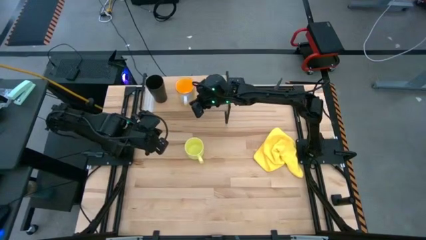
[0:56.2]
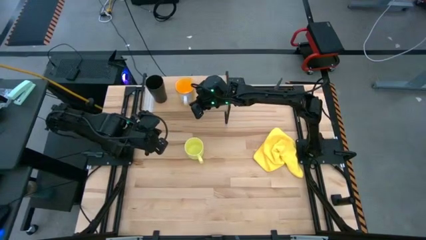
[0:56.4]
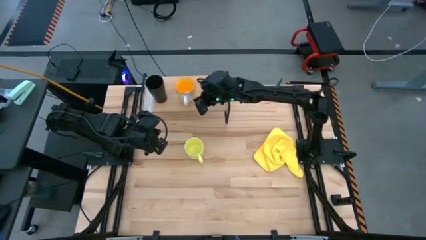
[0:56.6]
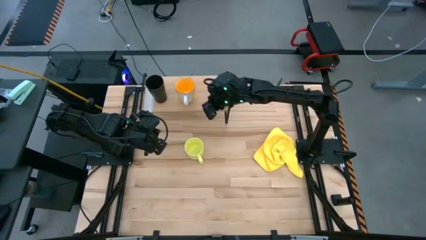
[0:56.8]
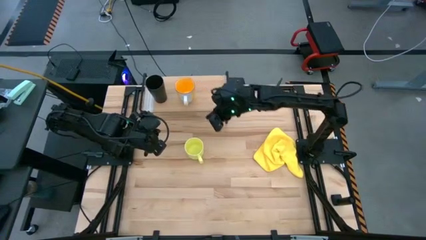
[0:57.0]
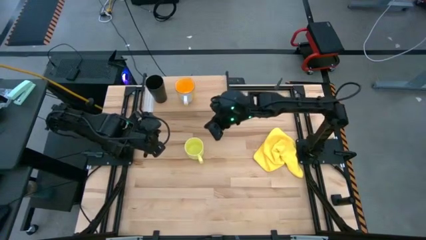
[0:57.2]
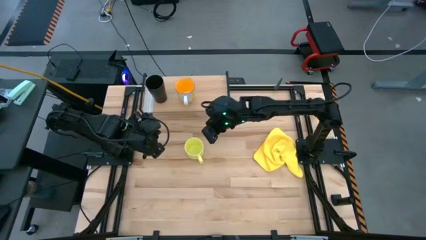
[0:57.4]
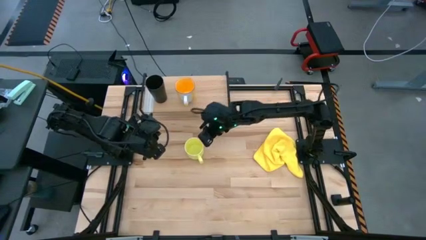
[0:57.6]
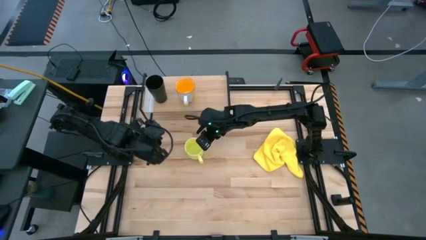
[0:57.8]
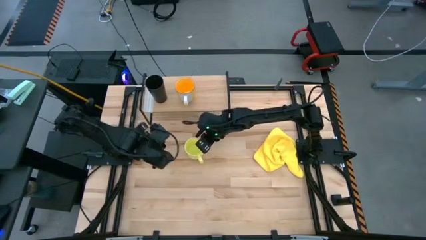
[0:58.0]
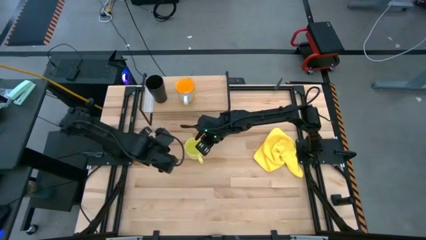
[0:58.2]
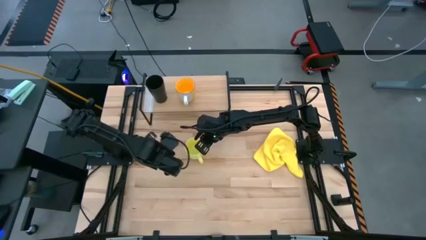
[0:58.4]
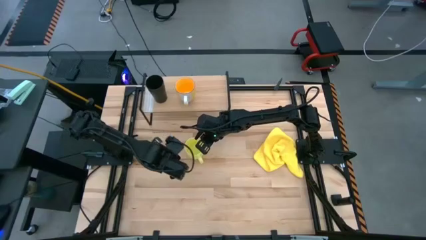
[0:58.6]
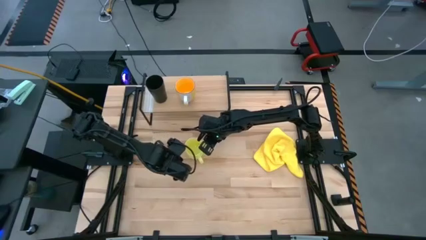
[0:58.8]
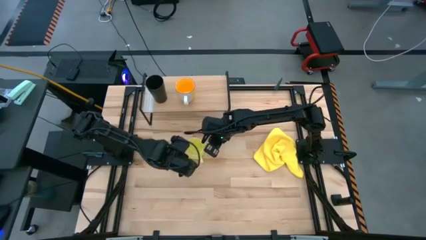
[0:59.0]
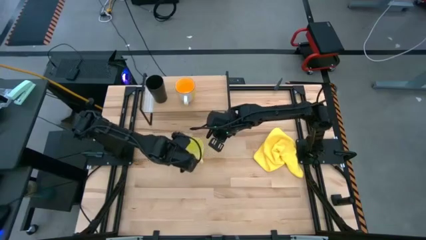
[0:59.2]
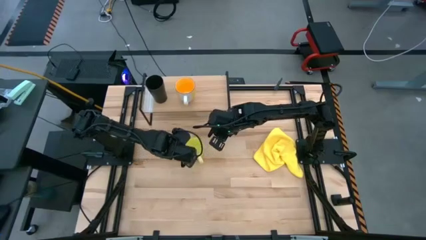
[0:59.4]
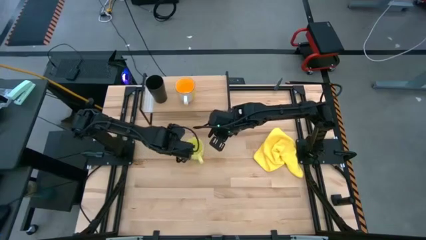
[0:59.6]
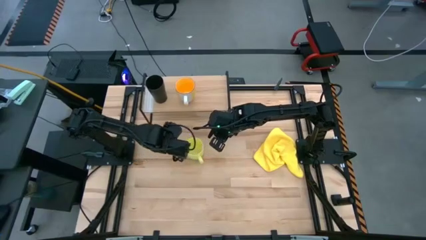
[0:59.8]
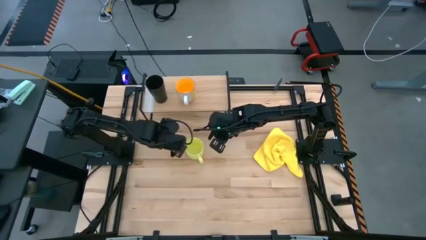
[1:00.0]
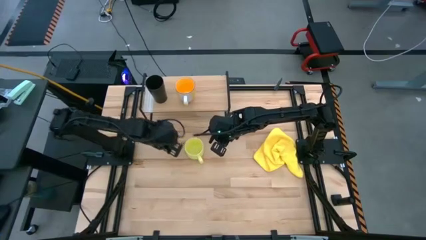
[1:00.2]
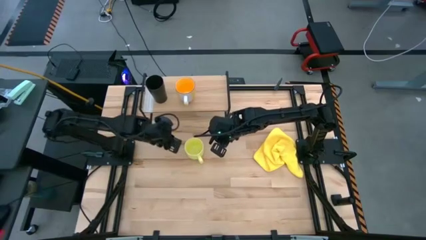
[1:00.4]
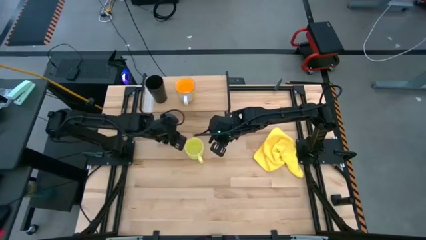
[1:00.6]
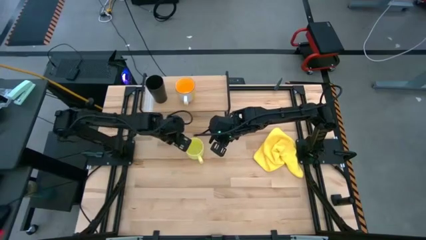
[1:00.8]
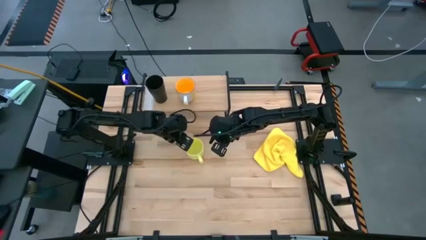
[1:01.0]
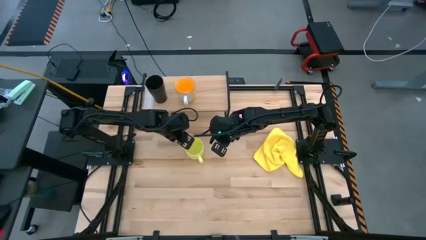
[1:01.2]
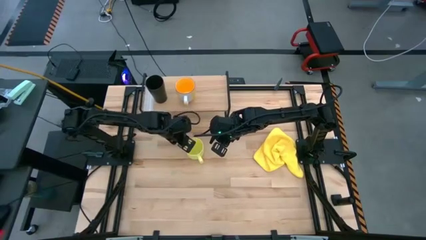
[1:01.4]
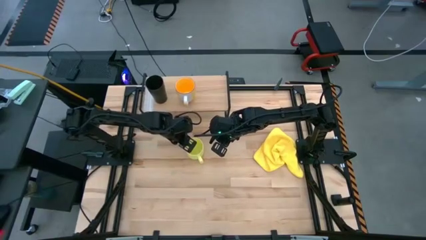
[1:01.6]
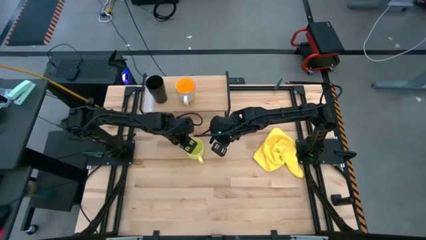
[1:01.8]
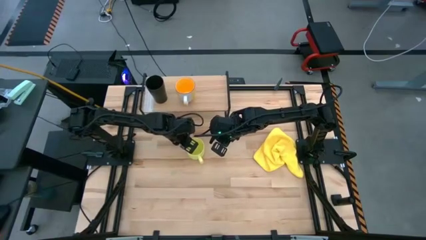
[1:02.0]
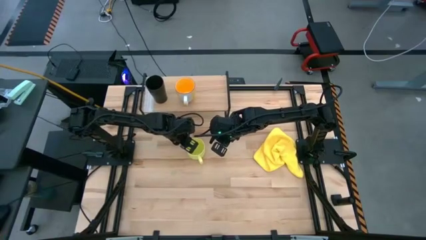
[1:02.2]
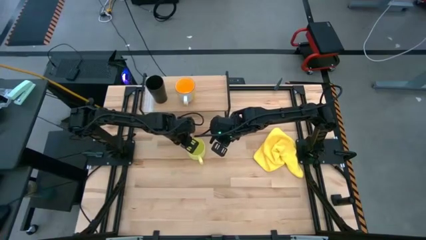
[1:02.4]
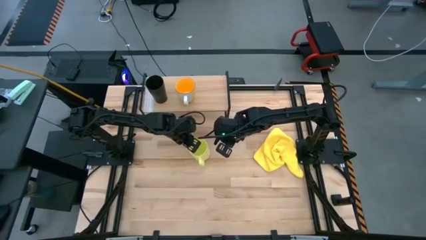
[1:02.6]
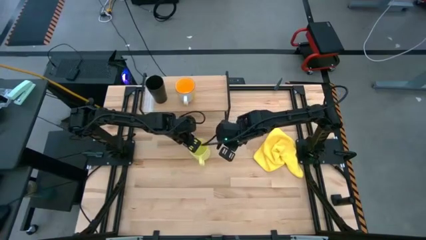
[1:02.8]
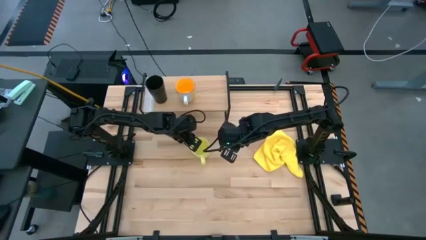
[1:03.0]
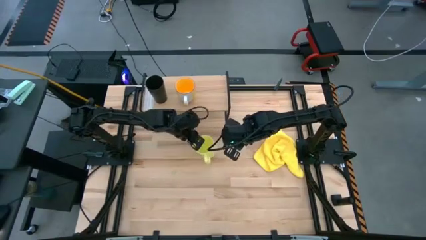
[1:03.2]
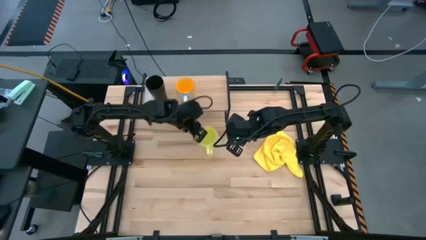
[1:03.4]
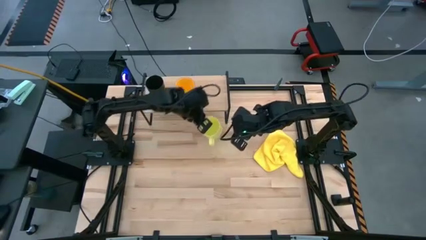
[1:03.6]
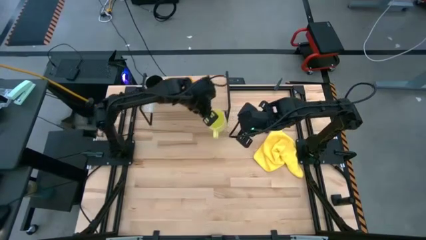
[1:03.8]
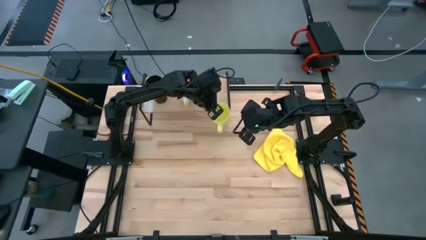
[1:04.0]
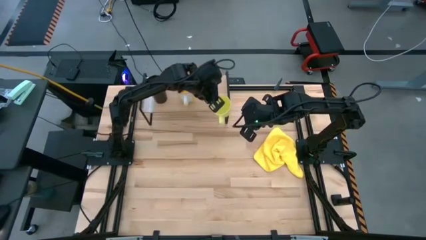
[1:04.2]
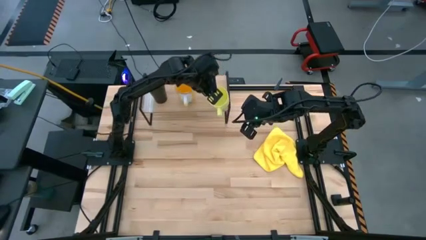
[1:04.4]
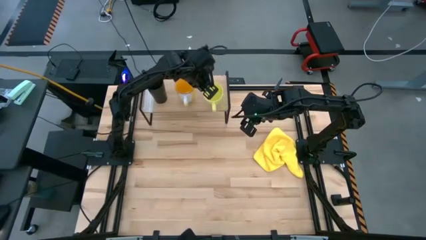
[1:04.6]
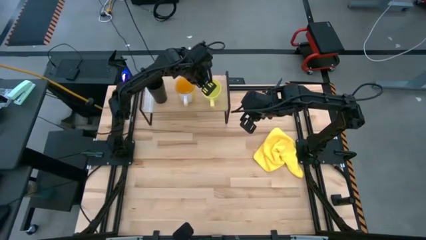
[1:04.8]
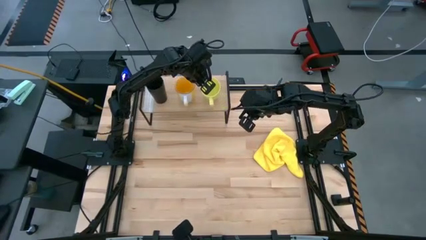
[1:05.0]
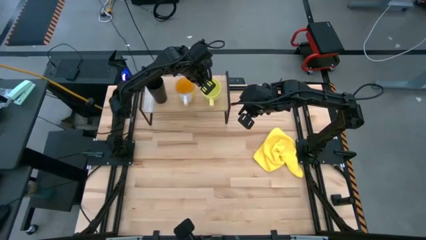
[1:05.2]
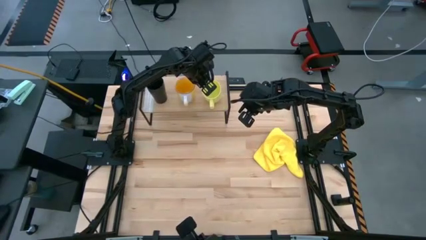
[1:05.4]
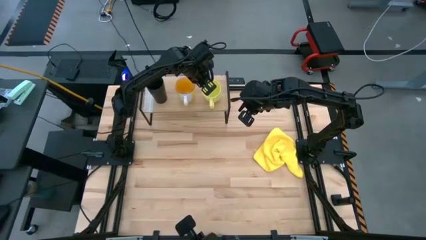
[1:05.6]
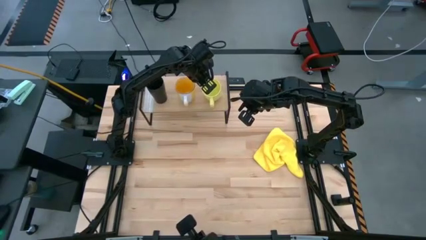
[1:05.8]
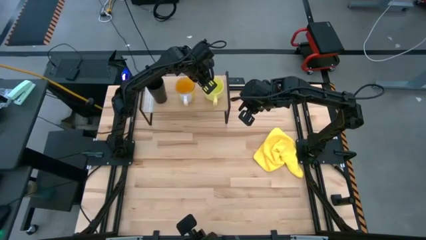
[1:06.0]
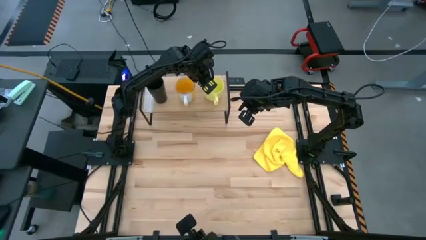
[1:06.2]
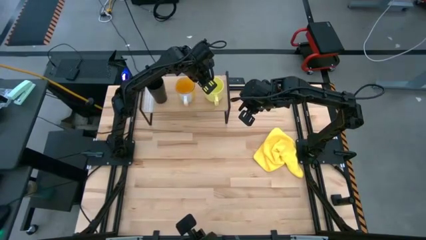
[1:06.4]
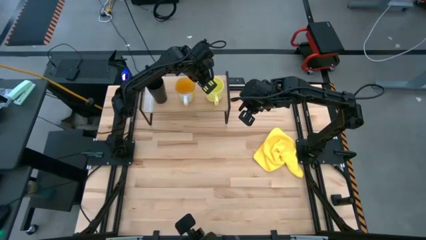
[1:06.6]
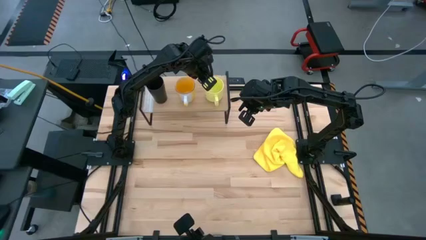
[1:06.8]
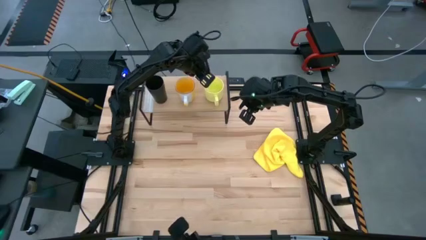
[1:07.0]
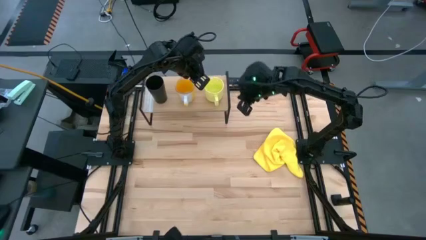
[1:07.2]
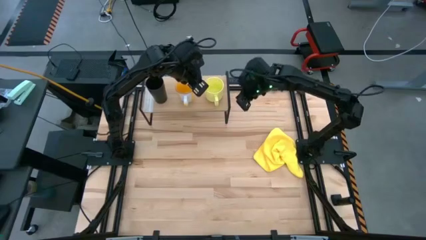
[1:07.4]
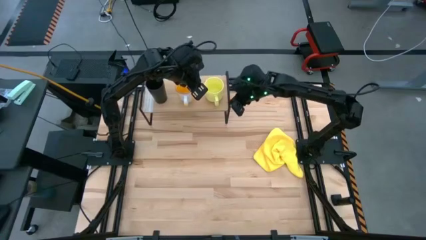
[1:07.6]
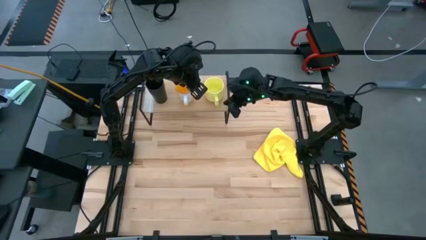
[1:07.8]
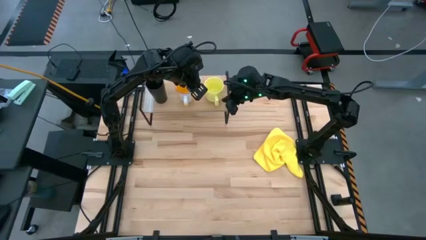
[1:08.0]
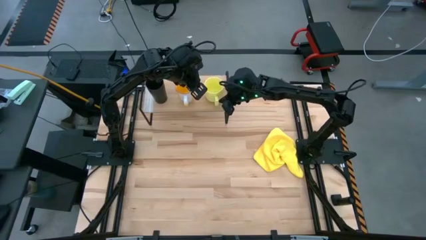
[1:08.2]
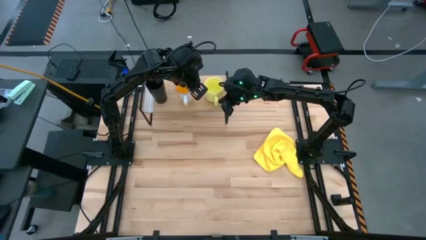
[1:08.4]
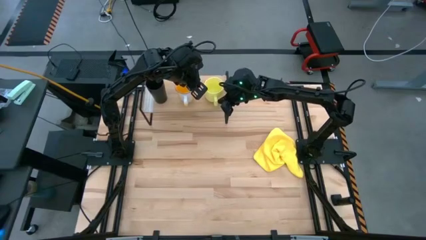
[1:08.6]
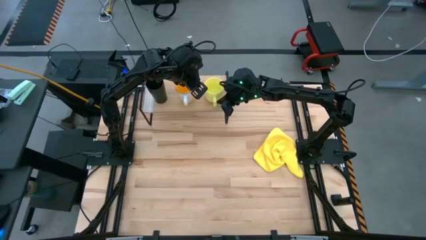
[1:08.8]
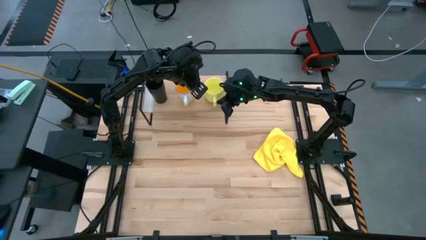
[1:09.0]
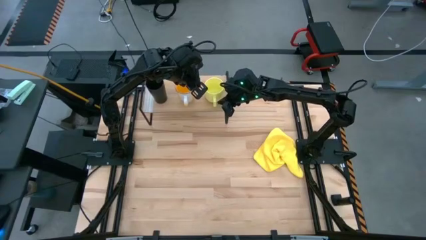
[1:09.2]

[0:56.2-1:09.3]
Task: Stack small to large cups/mugs on shelf
Put the yellow mug on the shelf
